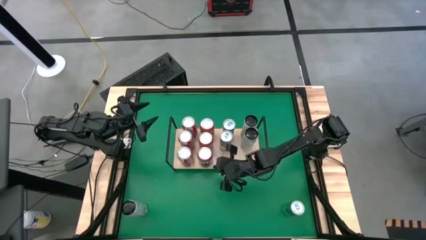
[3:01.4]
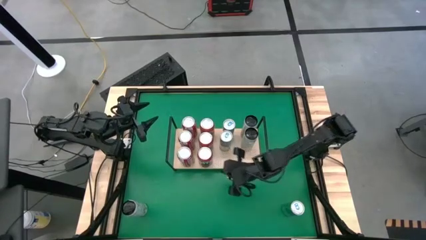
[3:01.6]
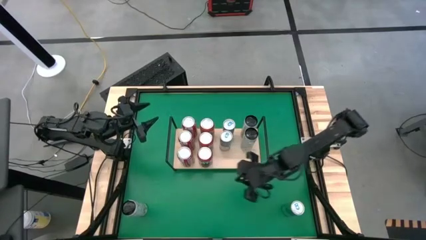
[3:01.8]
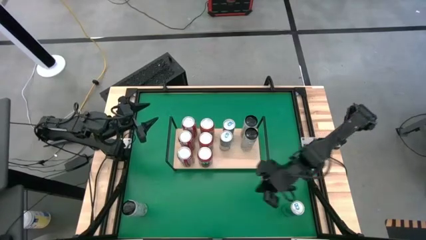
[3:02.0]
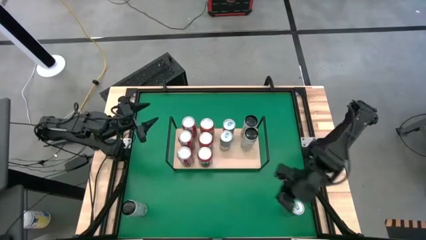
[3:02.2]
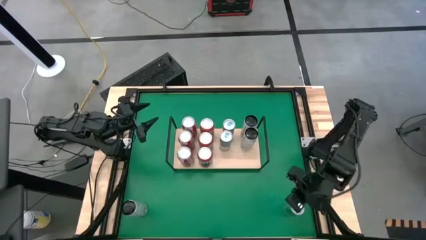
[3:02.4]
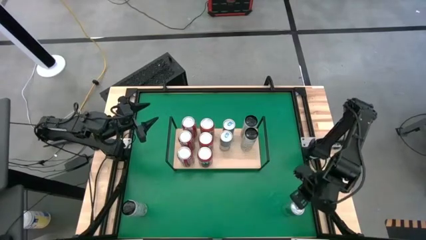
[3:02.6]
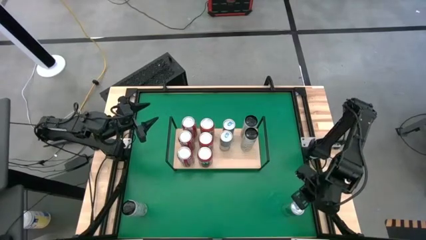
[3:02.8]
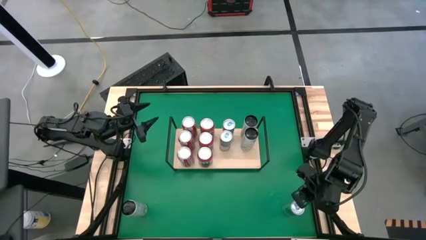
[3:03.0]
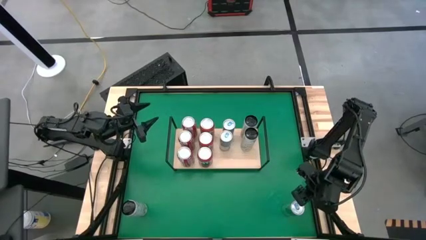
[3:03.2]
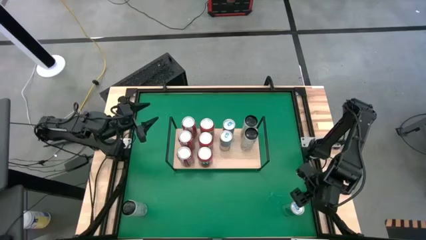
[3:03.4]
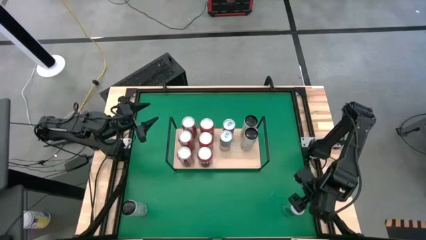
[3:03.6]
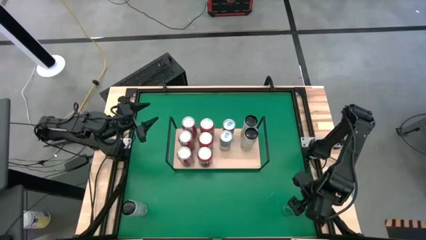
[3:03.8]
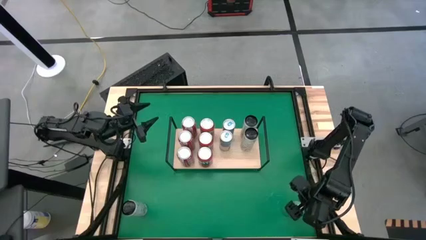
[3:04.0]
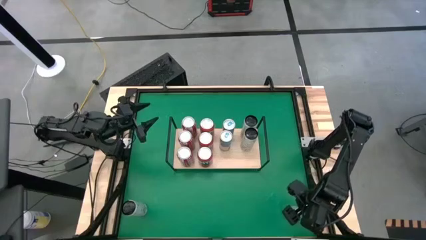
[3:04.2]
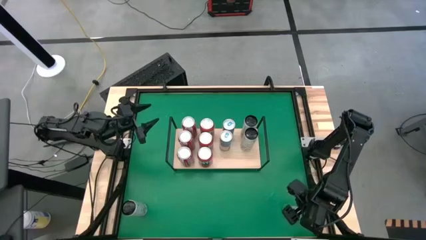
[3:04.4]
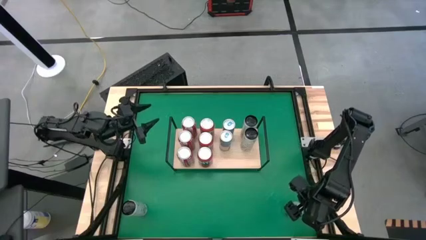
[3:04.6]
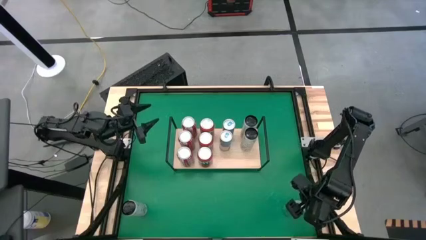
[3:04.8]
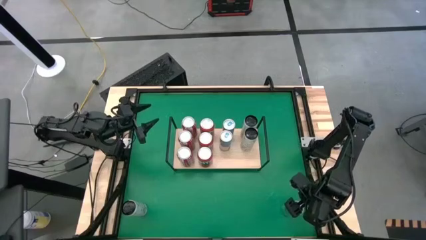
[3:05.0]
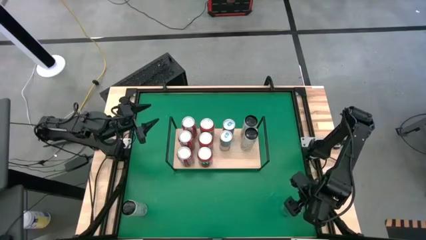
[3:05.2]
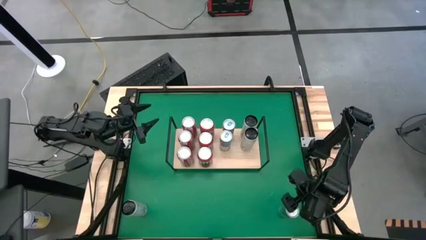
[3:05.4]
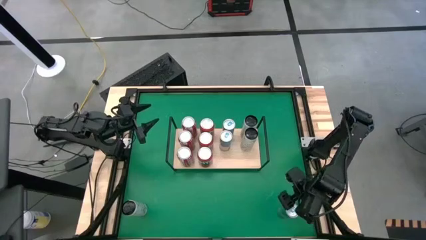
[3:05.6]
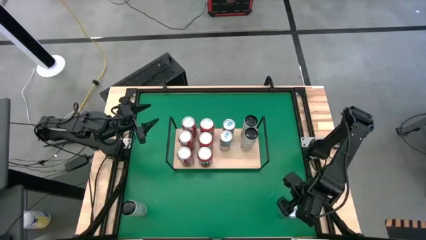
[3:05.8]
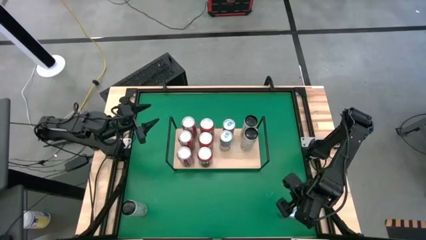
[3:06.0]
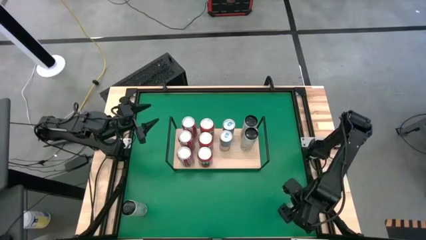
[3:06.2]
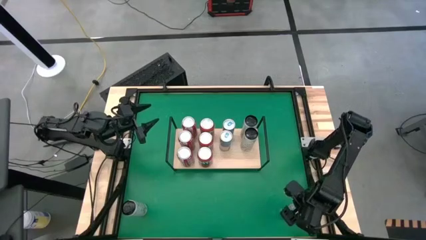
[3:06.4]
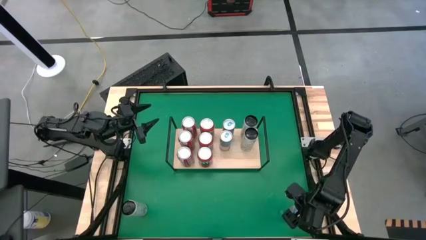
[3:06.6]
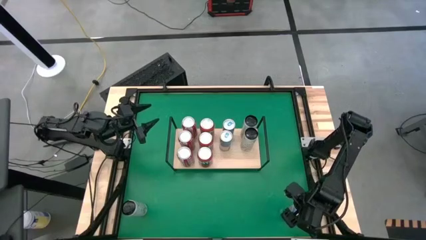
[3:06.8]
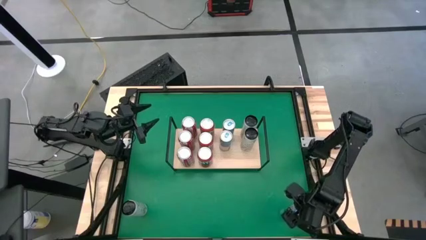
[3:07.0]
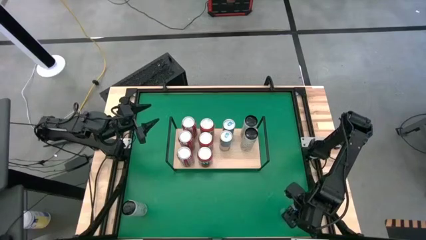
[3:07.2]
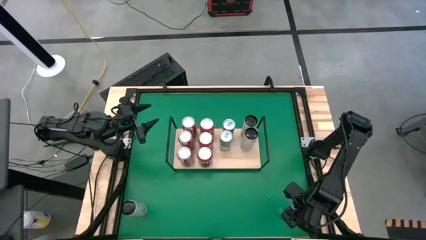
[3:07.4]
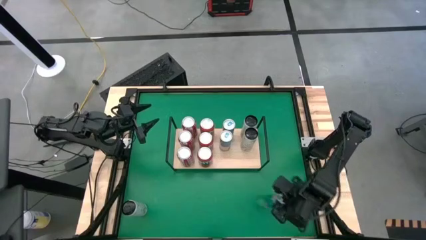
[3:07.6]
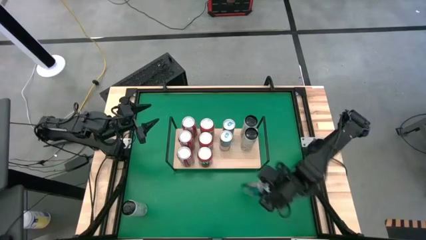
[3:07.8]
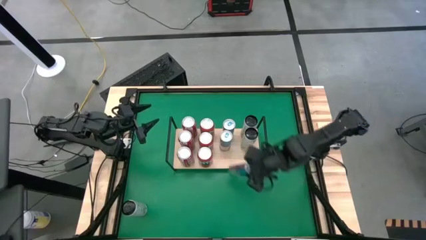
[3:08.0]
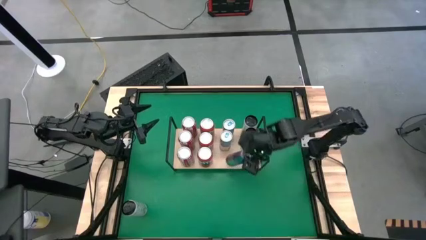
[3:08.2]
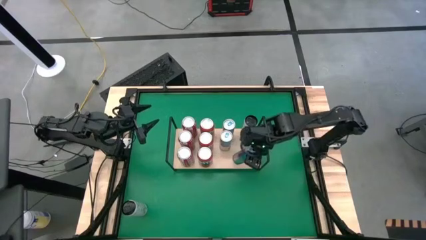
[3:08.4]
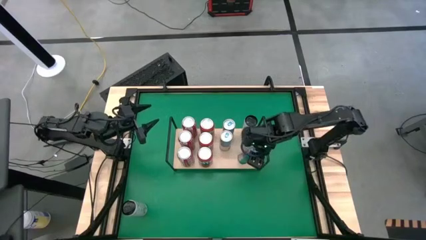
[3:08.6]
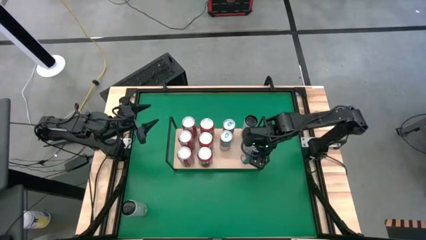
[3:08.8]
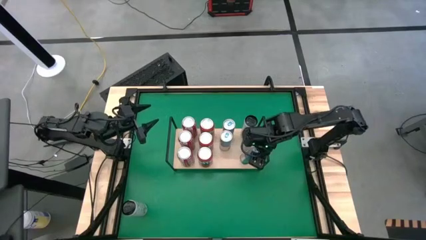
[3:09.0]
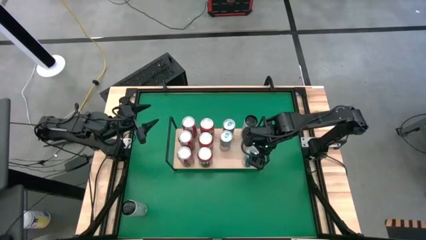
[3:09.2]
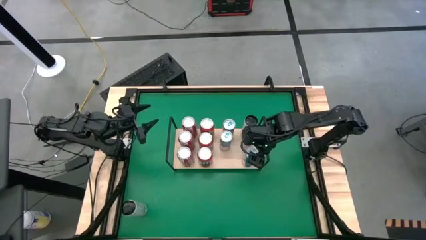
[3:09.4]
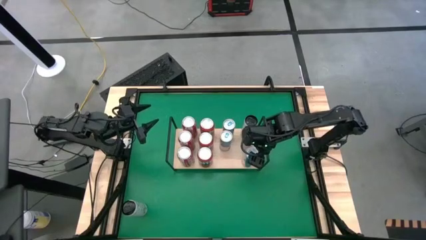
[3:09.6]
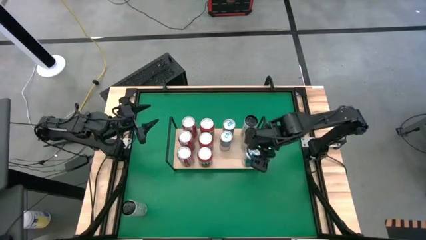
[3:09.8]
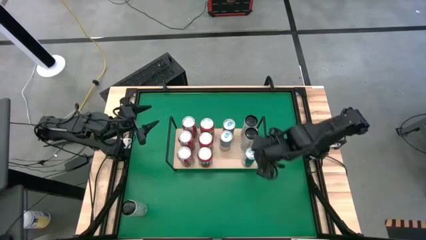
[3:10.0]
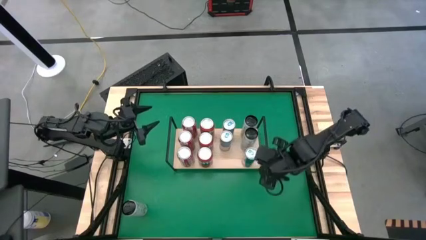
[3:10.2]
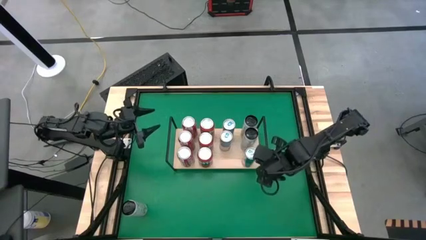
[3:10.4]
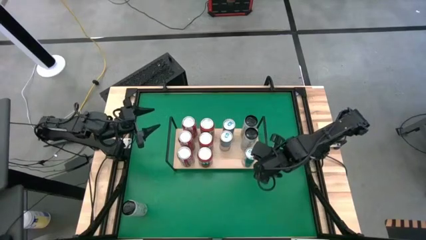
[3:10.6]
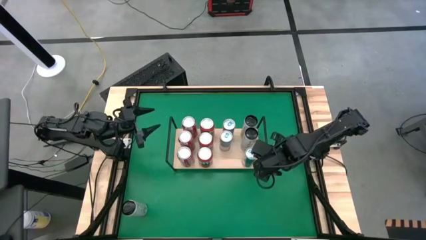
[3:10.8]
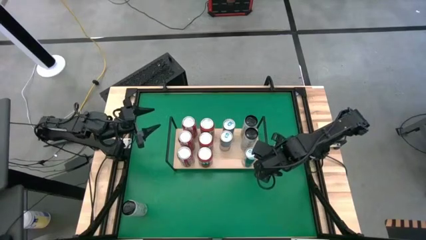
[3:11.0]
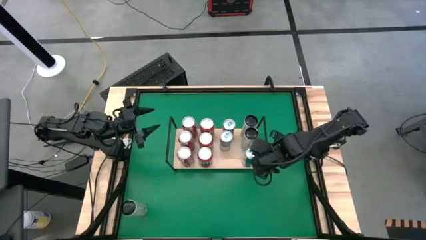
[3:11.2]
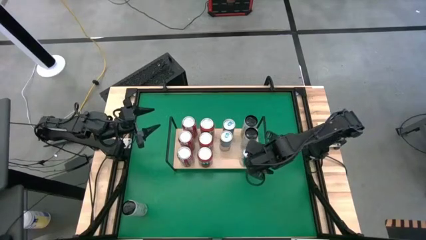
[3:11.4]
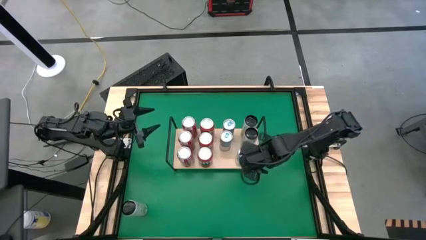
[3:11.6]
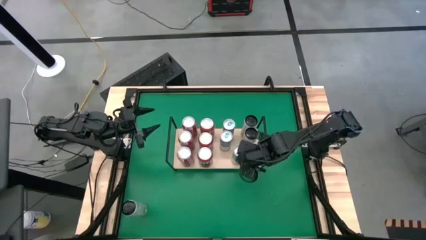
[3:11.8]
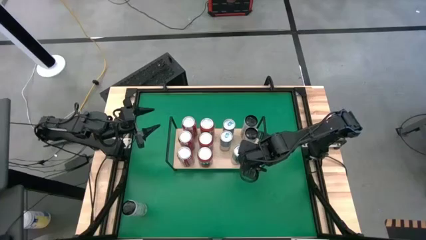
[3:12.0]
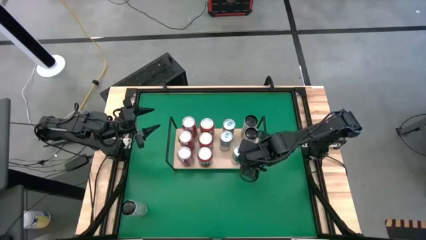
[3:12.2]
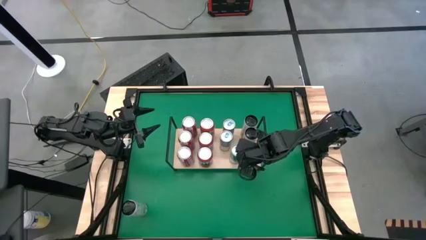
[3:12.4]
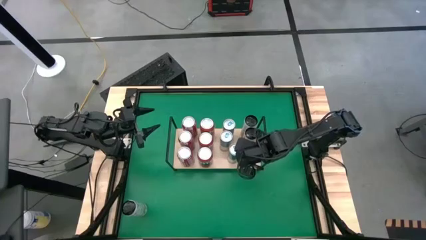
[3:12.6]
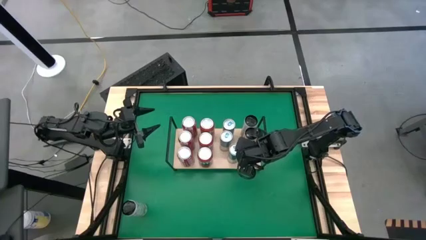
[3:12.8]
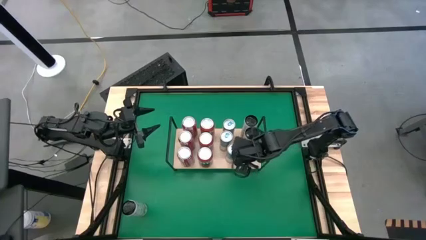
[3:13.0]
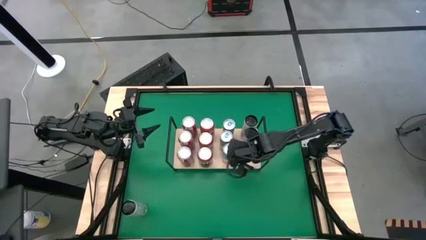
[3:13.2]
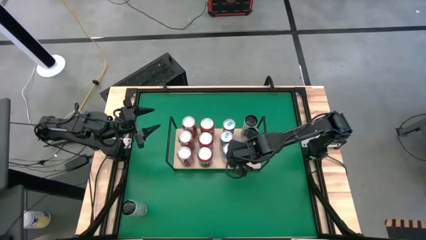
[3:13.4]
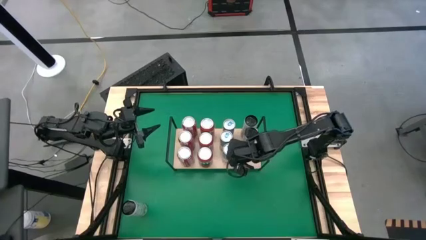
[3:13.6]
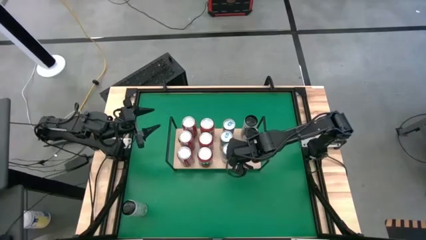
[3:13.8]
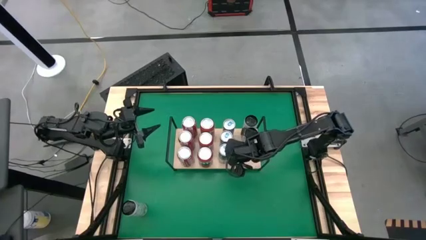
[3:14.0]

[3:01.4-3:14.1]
Task: Place canned beverage on shelf
Put the blue soda can on the shelf aligned with the other blue soda cans

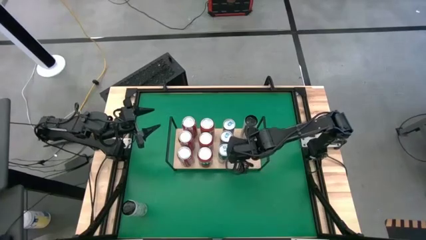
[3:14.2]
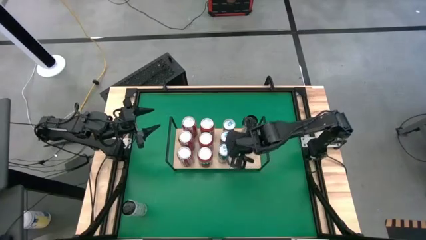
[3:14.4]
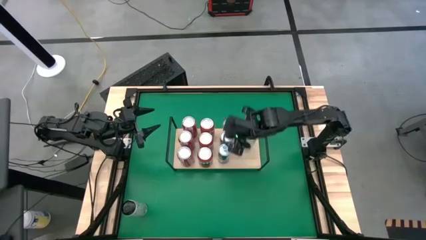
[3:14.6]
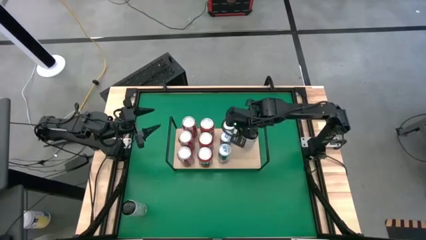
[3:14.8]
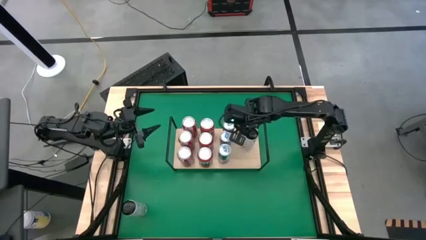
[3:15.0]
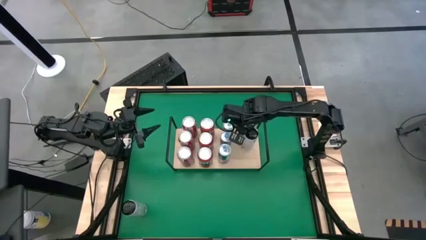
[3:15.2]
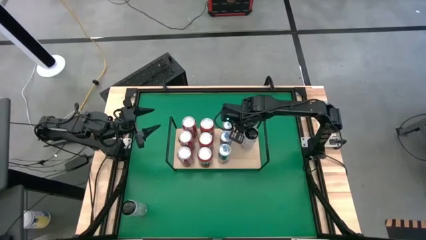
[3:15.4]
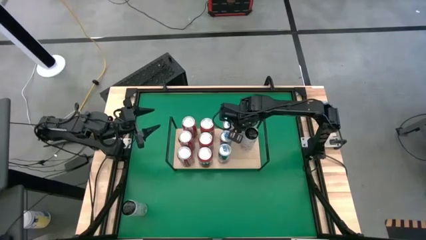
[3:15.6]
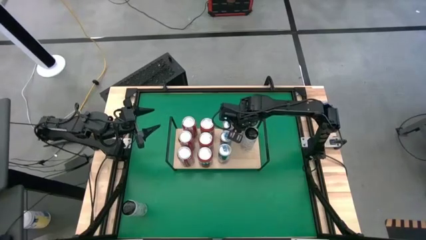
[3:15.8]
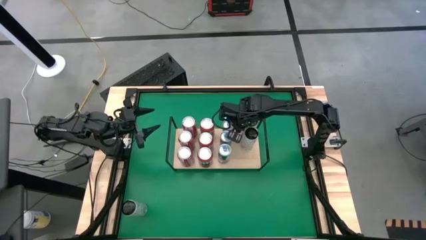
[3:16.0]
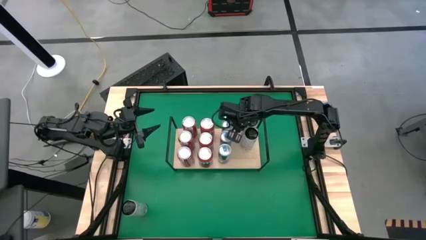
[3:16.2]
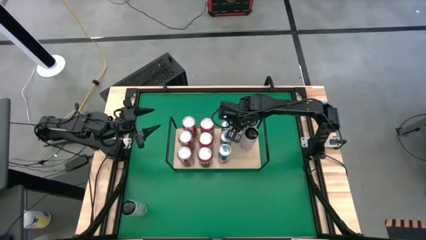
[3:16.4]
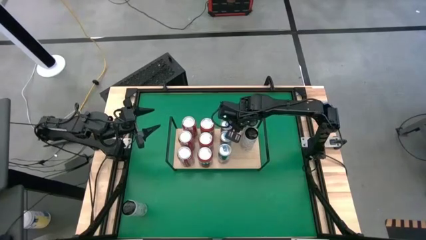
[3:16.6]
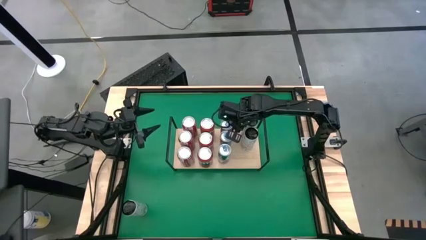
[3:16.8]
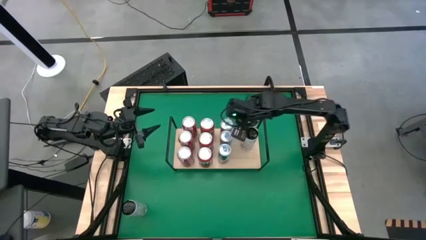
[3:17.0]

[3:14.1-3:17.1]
Adjust the top blue soda can on the shelf
